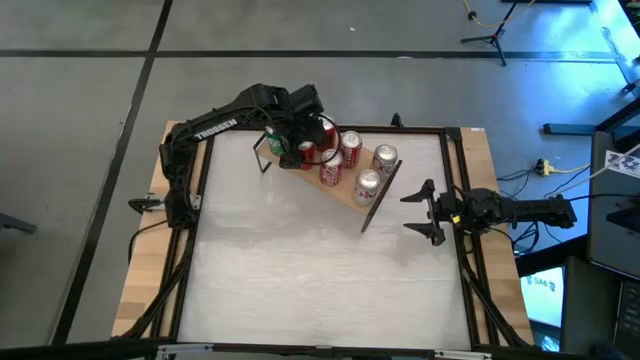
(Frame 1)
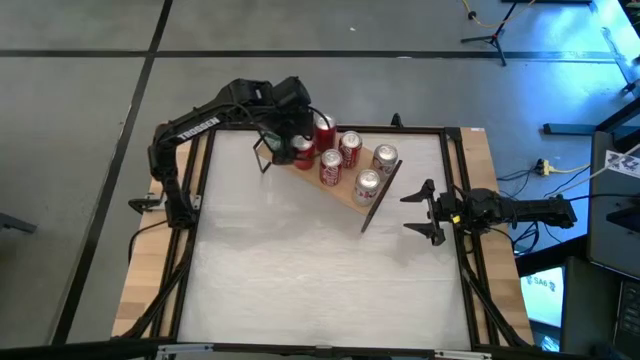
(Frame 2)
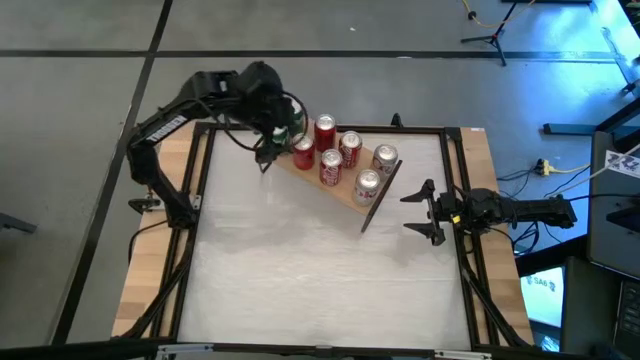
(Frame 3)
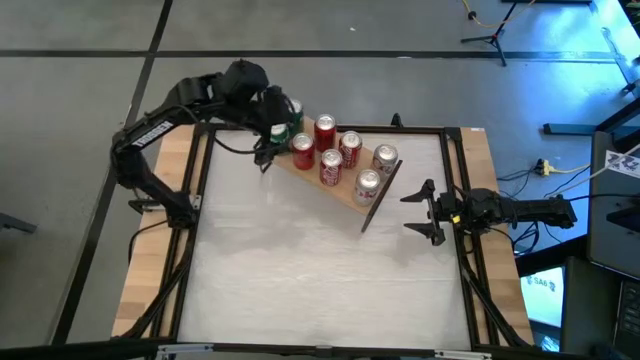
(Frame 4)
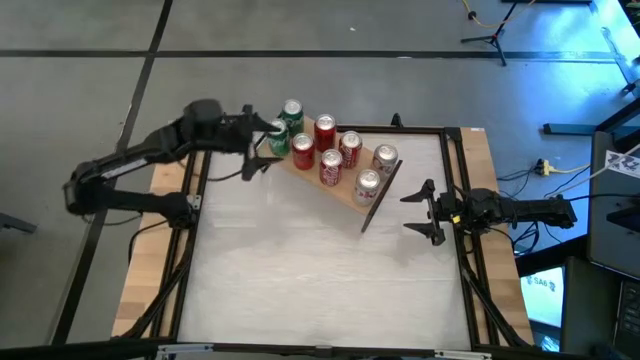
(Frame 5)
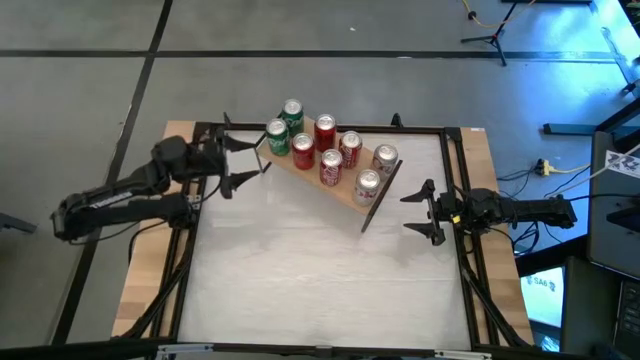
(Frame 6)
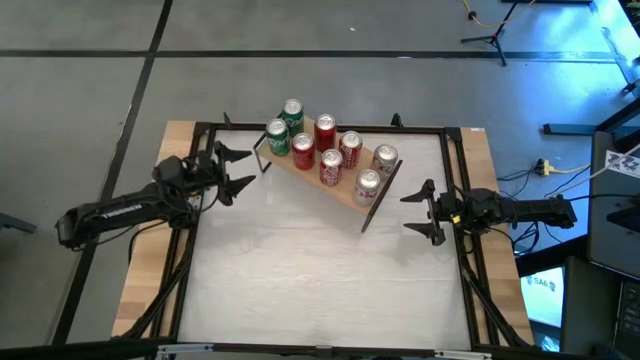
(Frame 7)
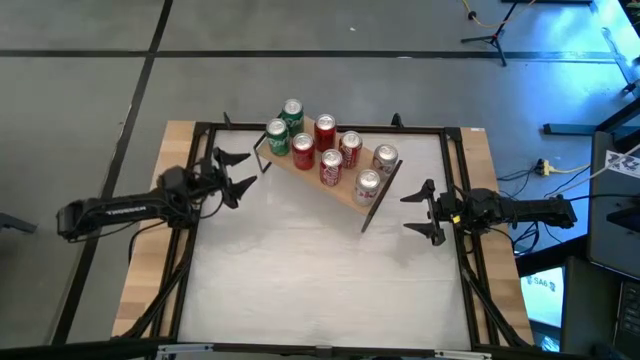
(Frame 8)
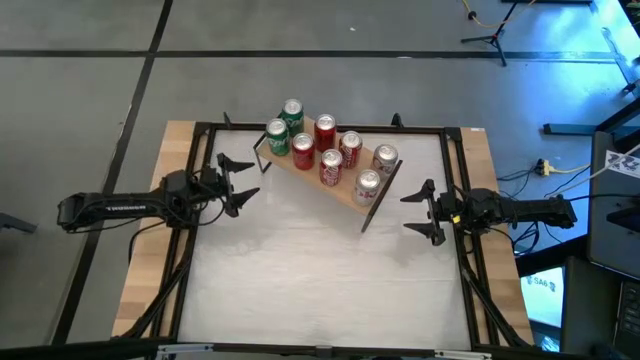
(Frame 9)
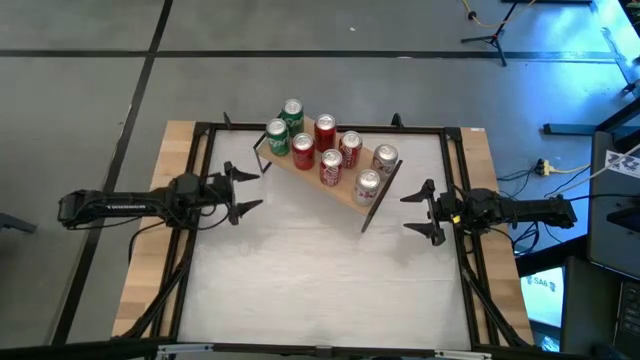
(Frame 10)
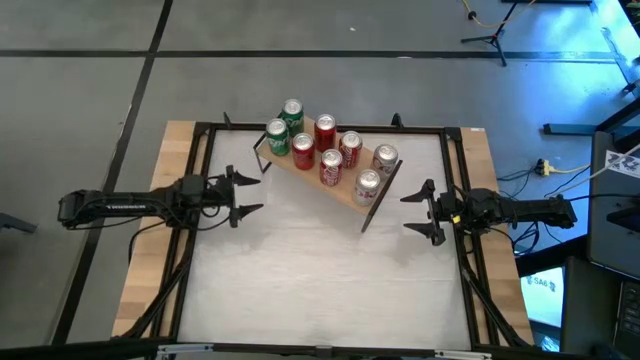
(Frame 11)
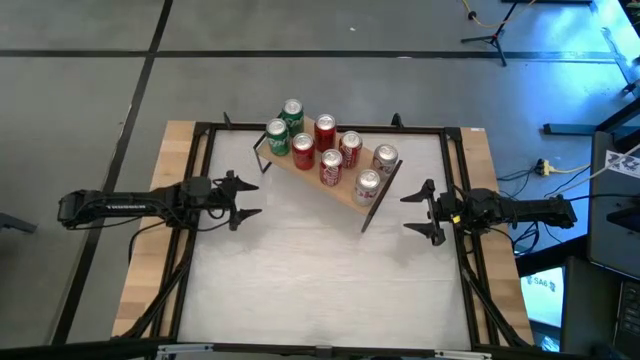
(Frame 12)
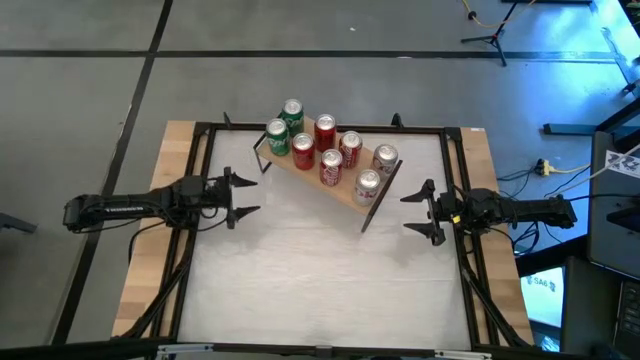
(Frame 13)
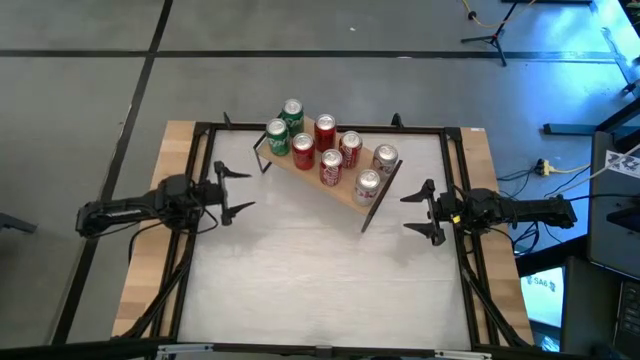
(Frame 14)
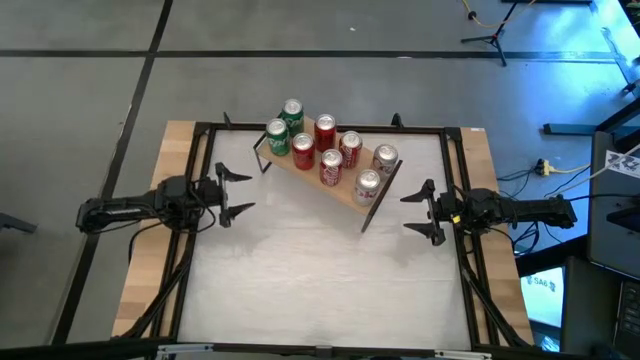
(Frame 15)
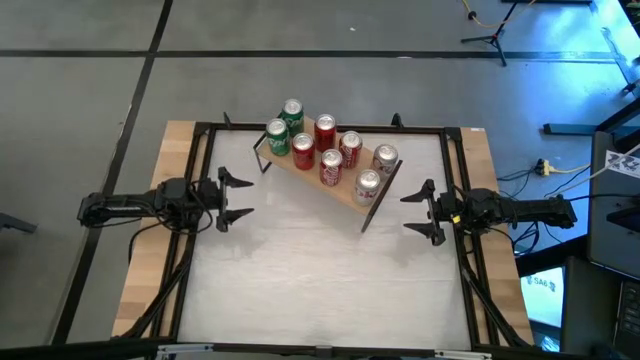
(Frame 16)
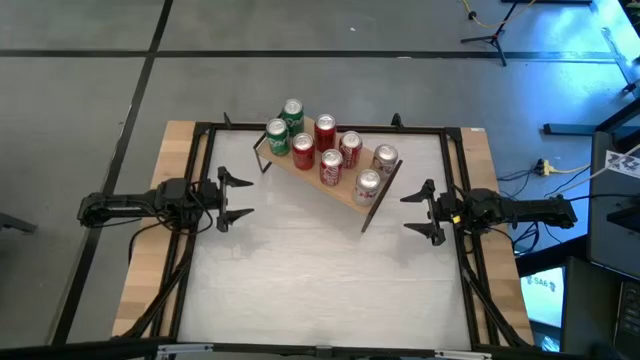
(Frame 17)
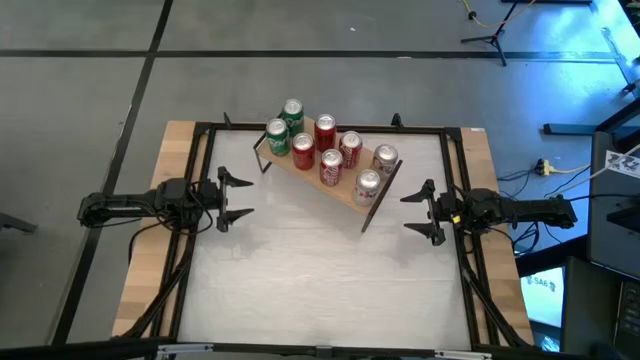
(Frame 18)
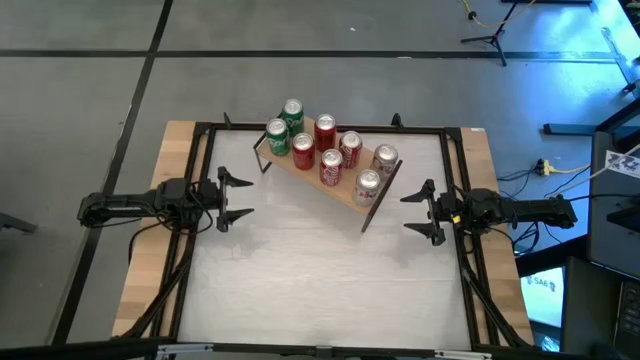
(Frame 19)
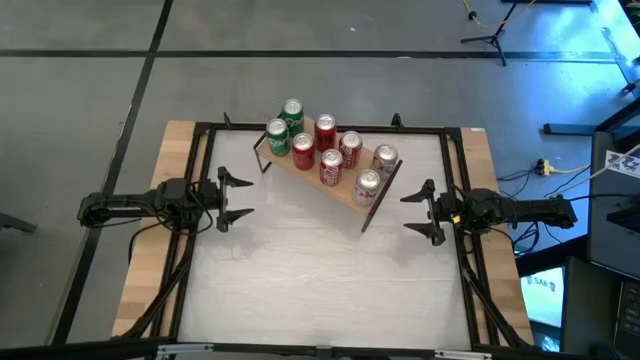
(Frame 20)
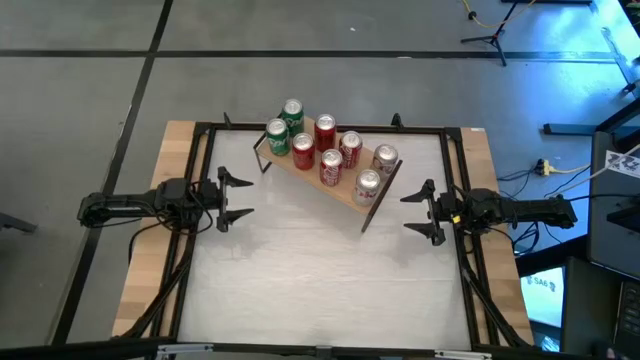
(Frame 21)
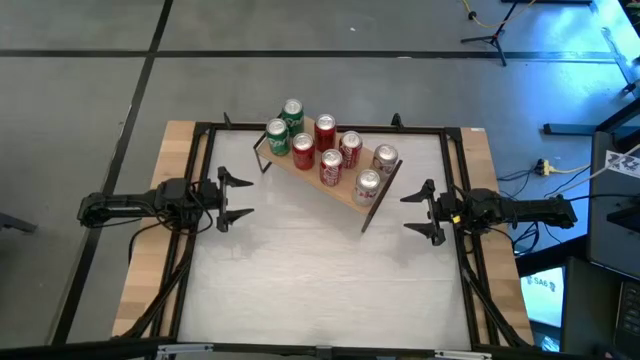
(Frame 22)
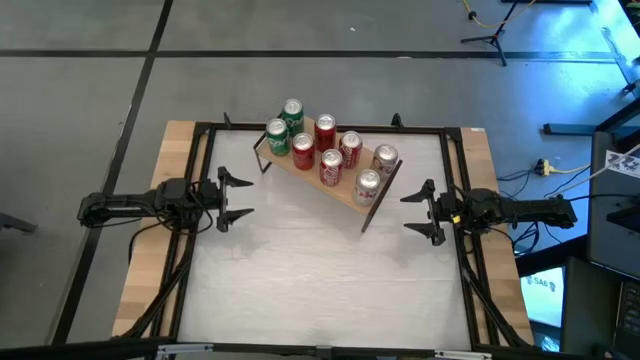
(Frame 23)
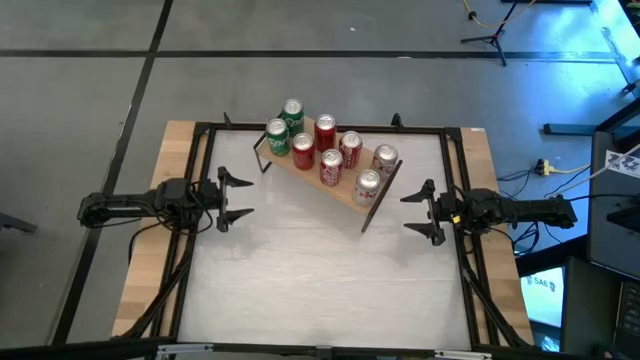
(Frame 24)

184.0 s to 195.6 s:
Task: Place canned beverage on shelf
Return to Home Position

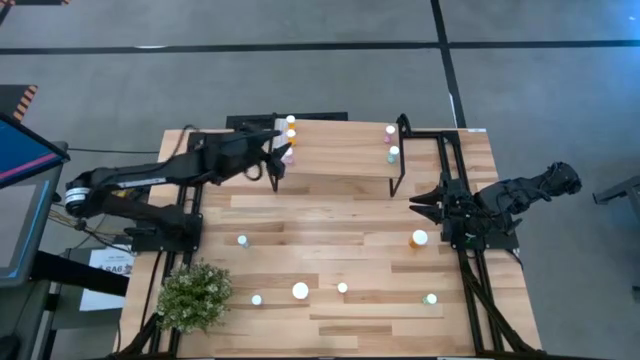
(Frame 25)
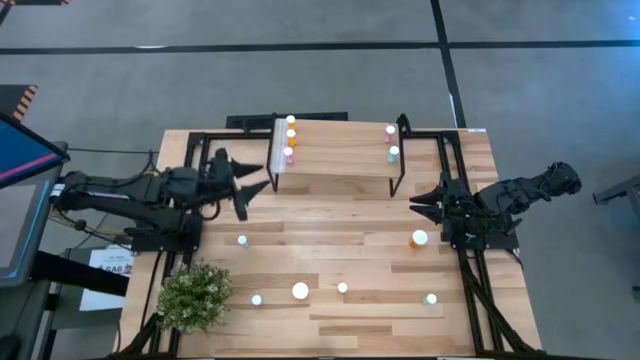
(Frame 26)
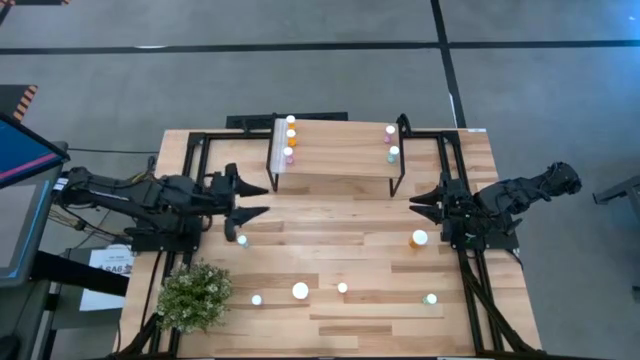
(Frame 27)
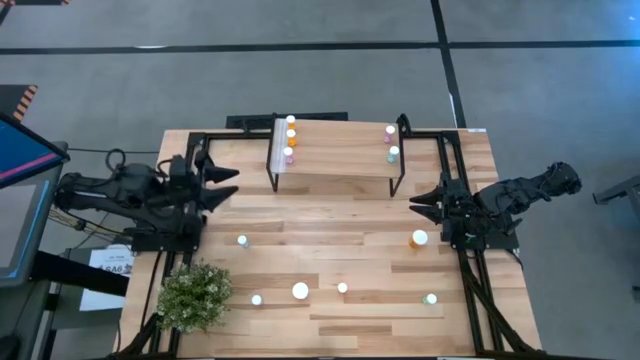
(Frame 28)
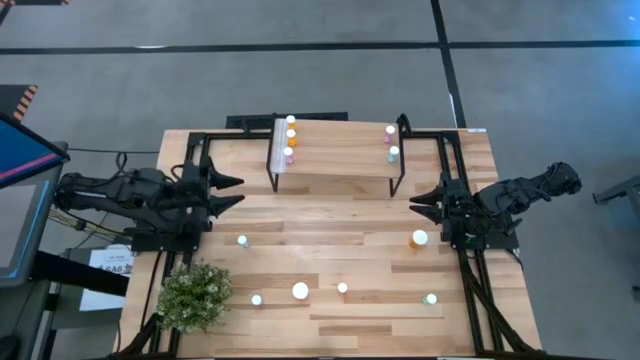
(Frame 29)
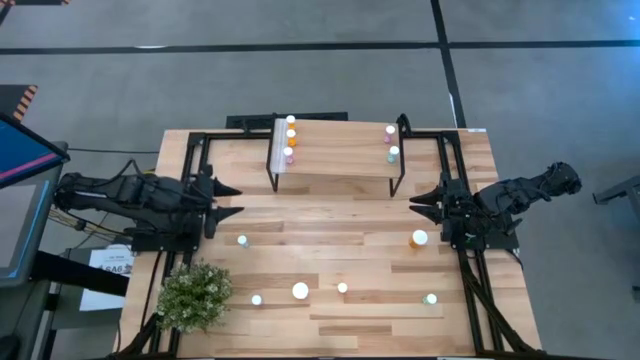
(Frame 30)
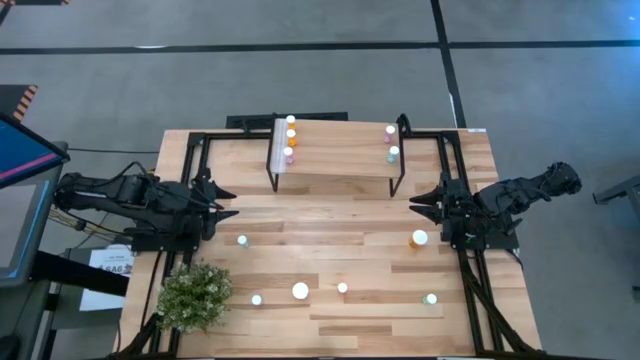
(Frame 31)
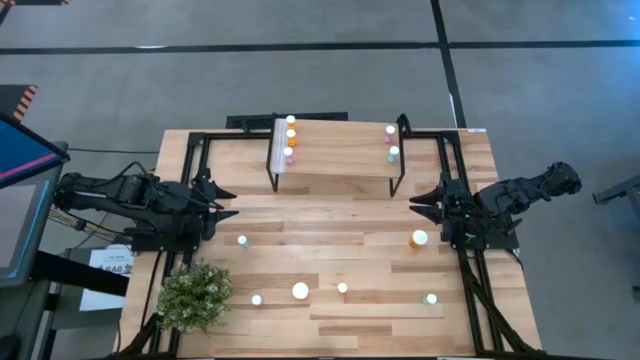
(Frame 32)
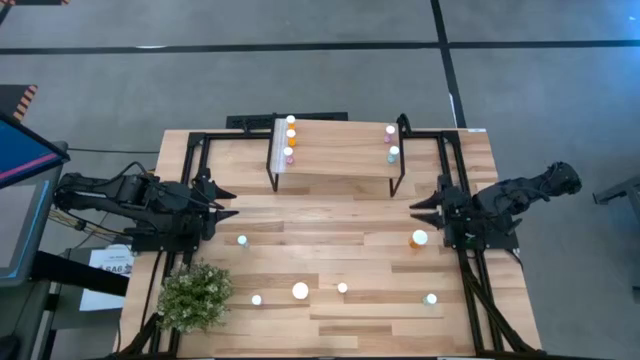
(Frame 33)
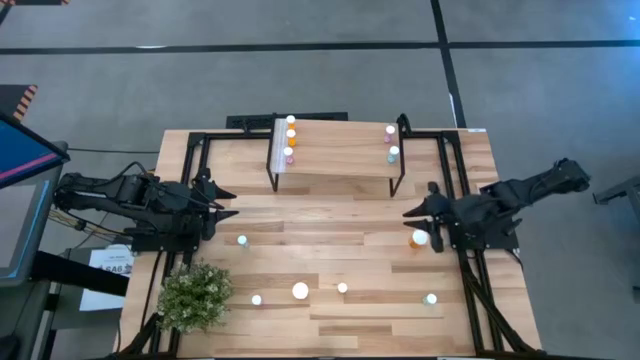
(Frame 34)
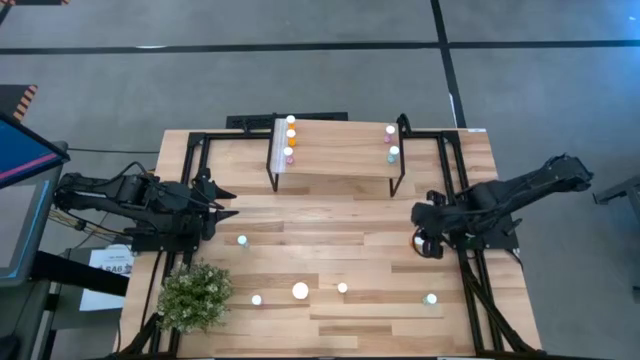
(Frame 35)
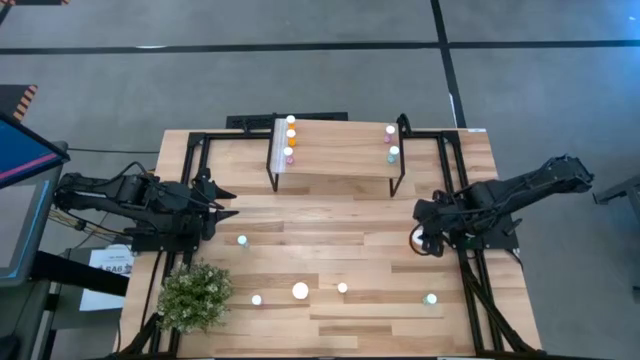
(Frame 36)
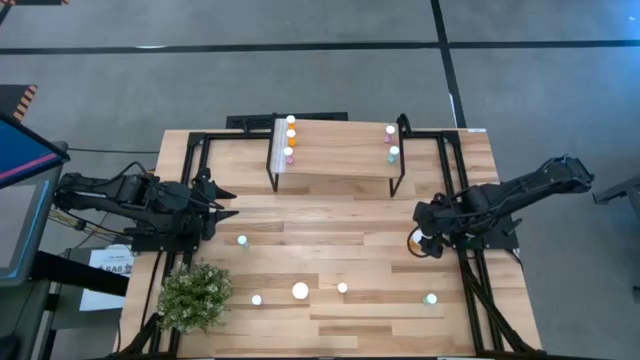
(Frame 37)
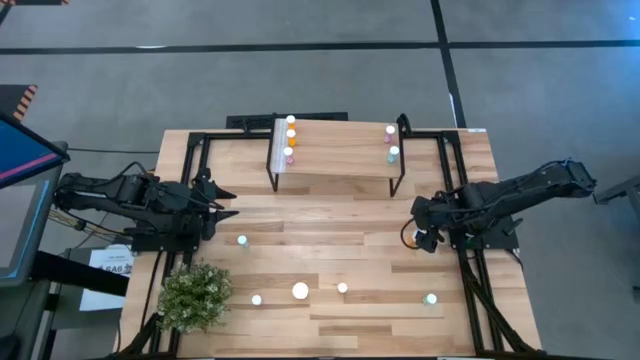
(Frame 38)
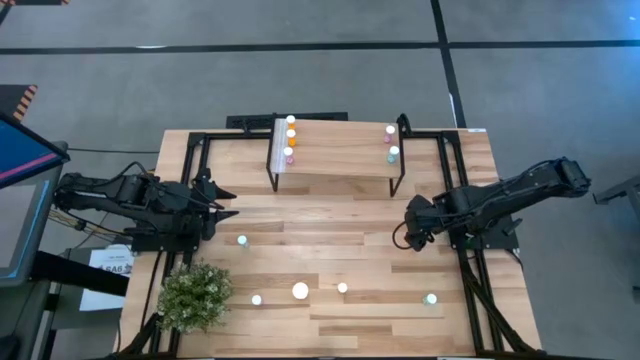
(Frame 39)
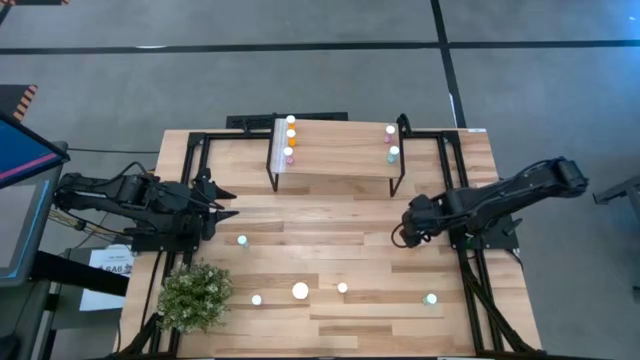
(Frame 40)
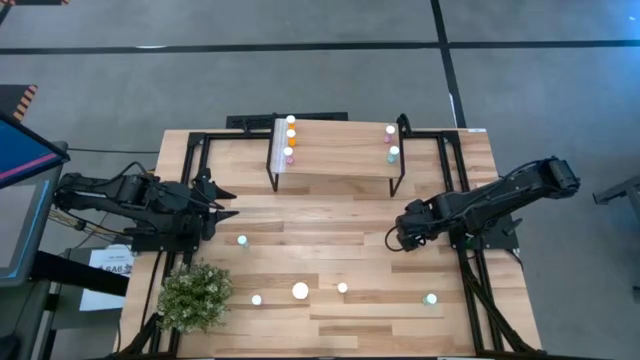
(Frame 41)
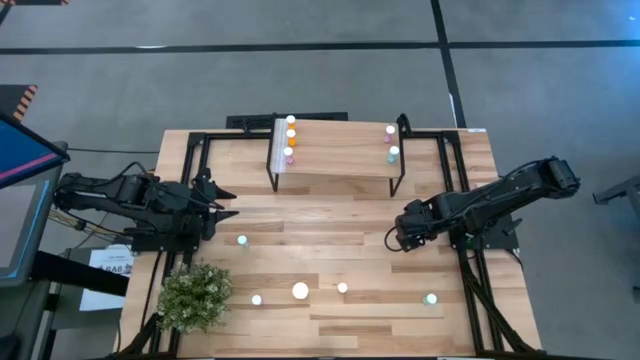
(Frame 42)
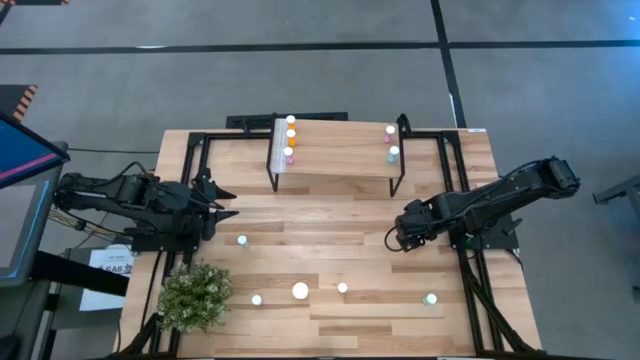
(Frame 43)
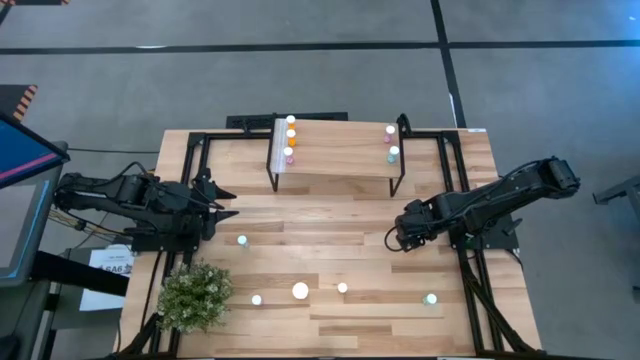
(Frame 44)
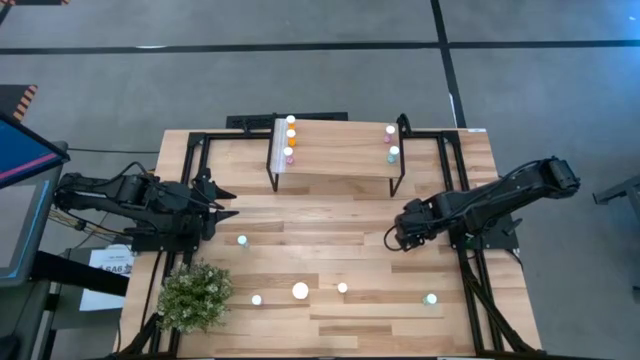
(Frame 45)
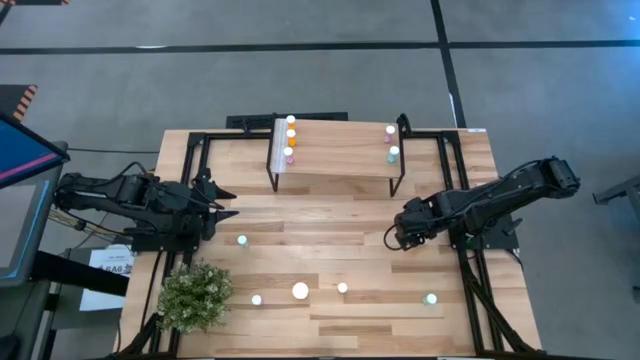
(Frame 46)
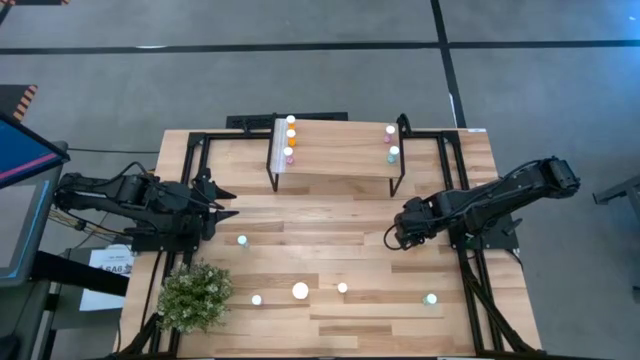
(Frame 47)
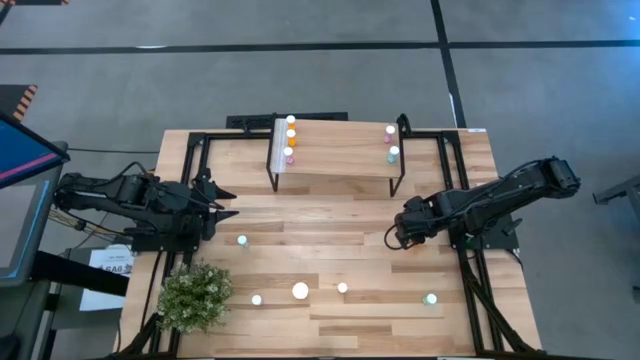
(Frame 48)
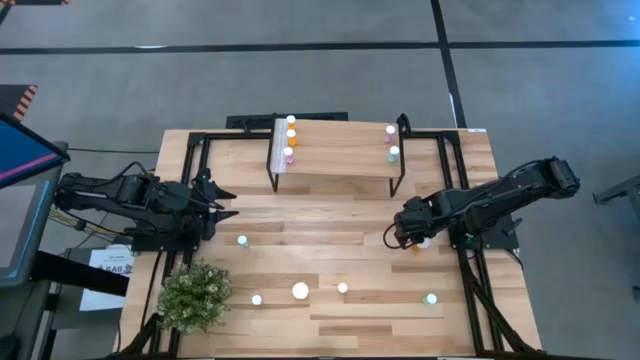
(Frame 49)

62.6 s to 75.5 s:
Task: Pick and place medicine bottles onto shelf by color
Put the top large orange pill bottle on the shelf
